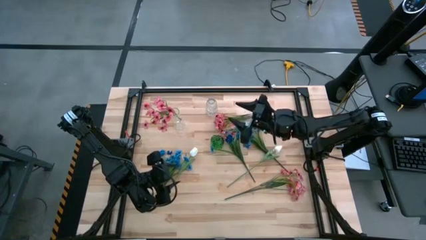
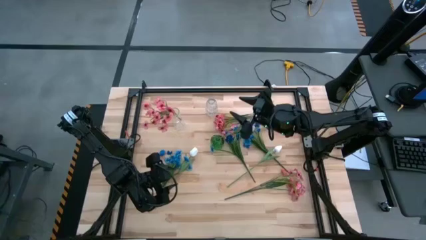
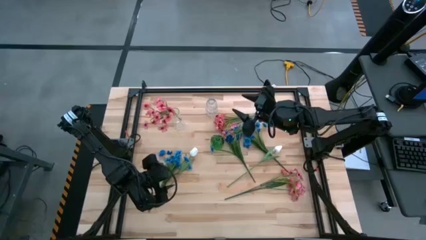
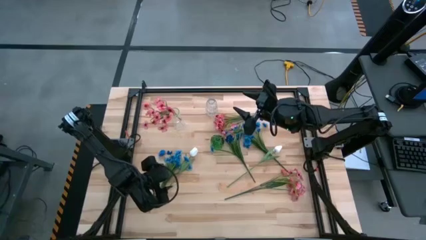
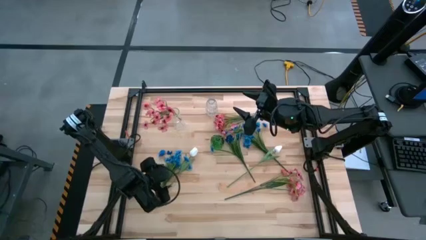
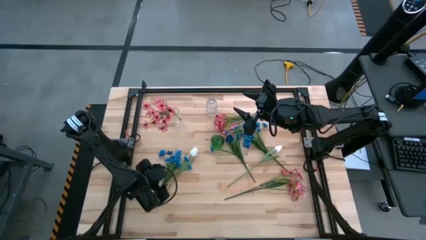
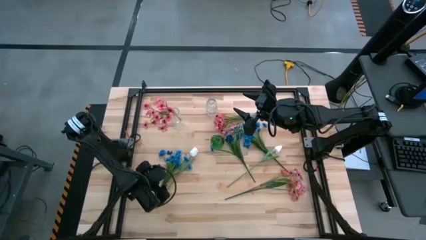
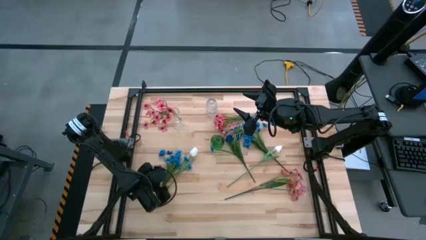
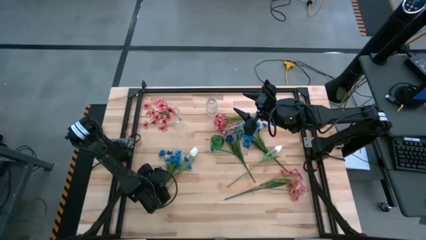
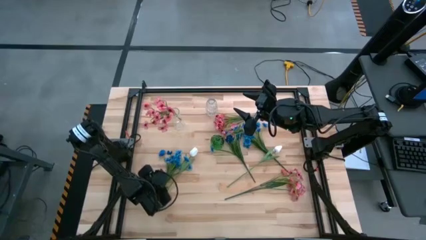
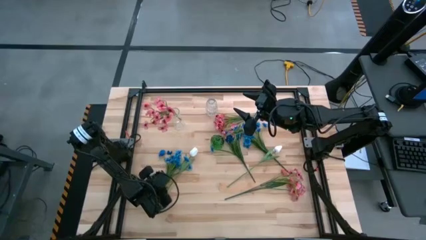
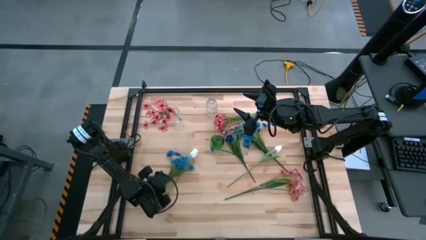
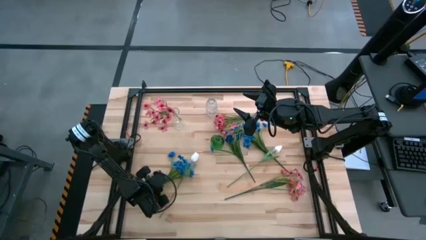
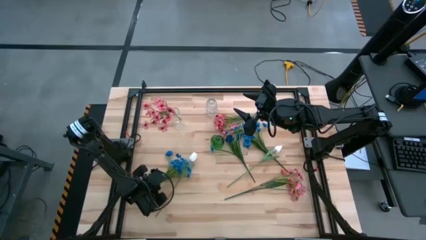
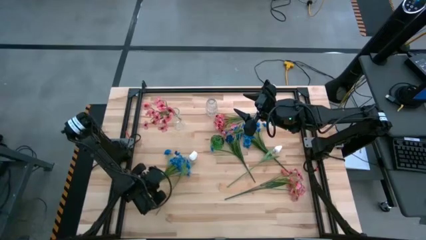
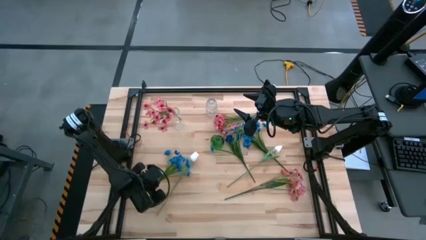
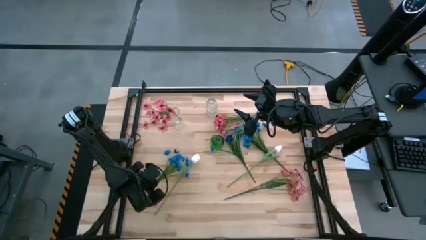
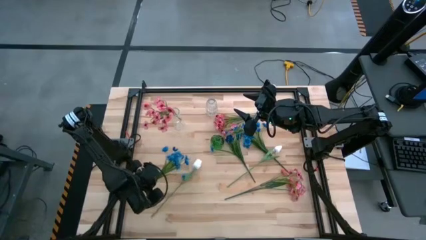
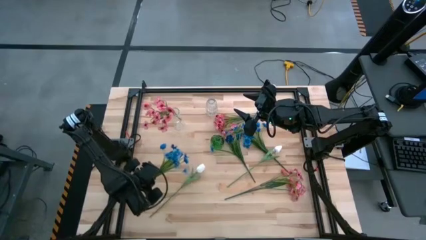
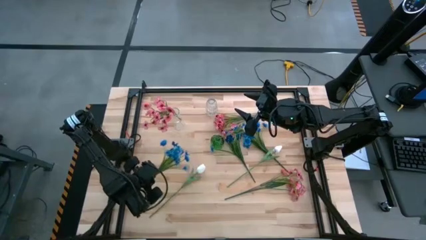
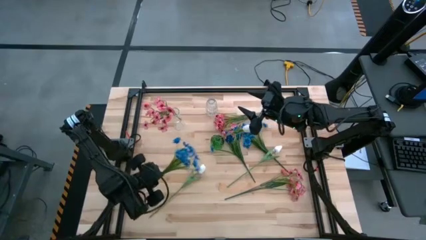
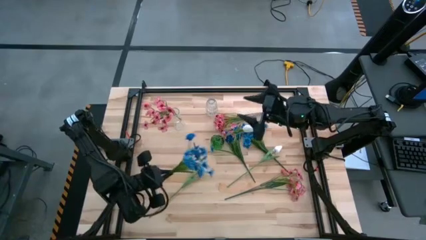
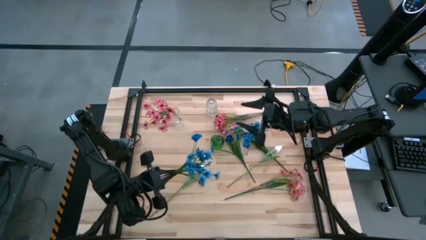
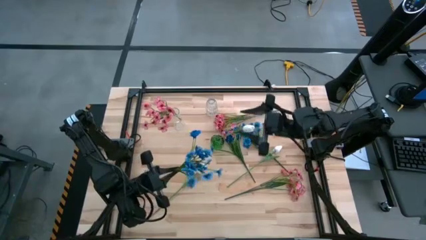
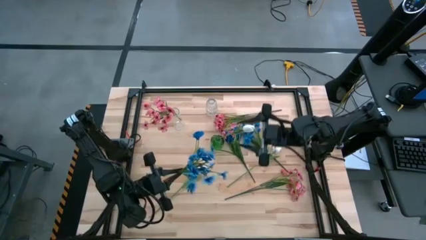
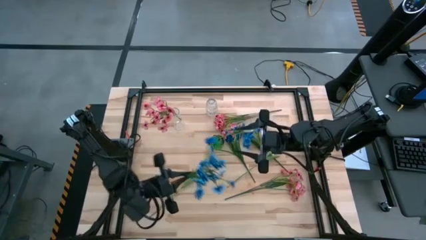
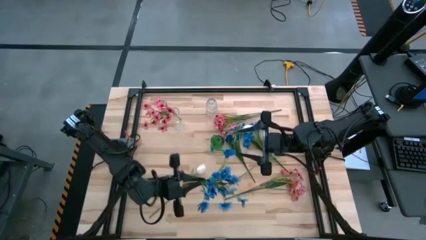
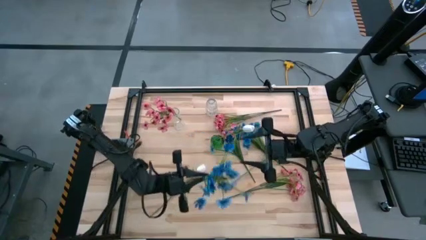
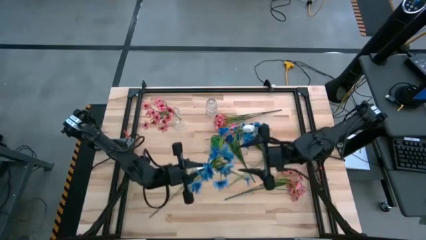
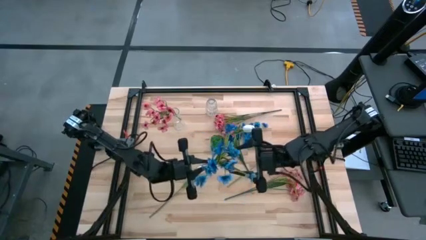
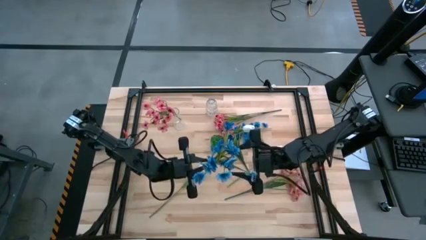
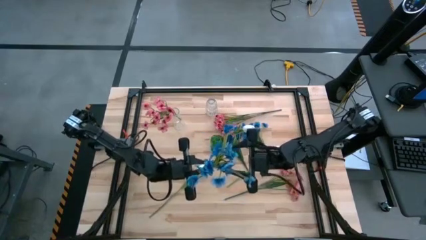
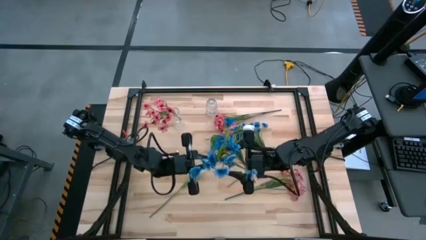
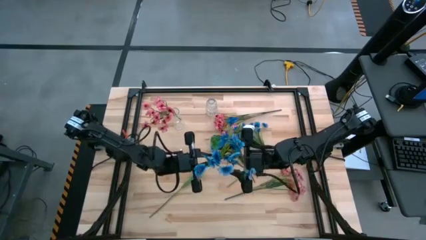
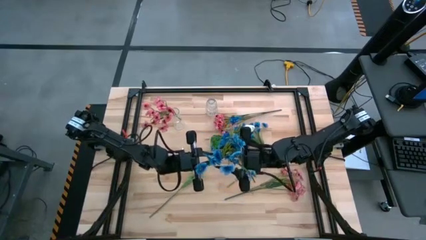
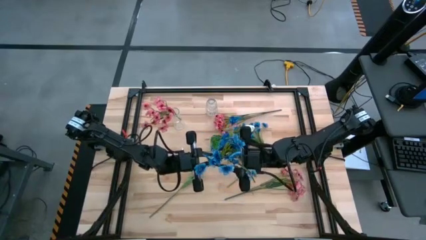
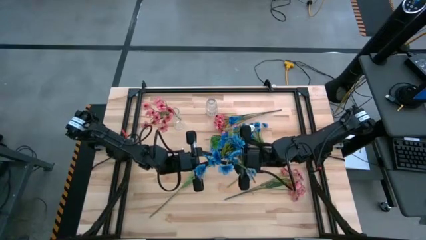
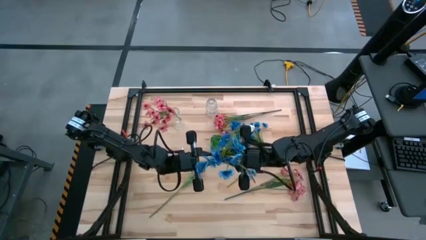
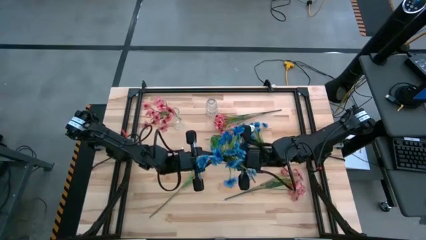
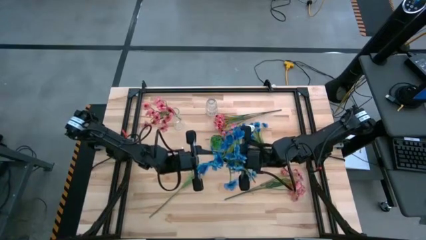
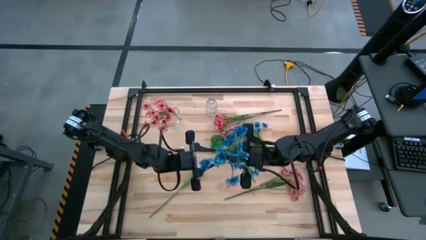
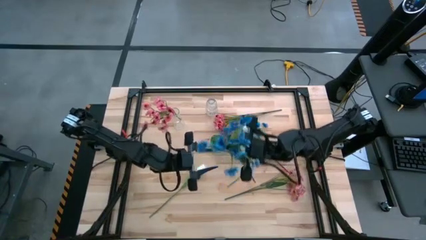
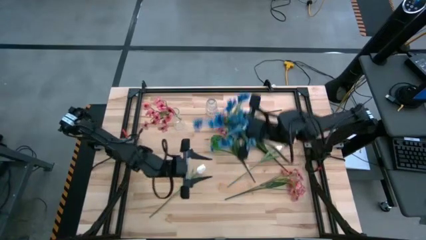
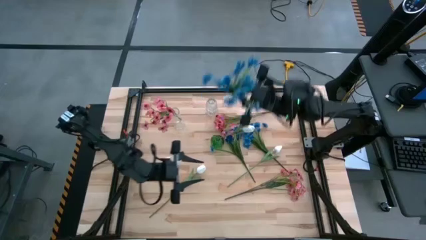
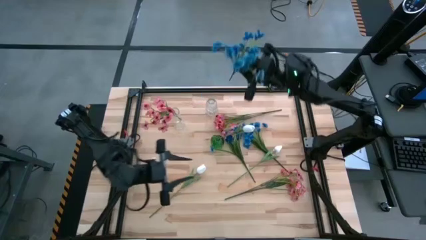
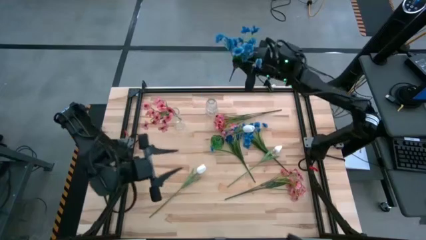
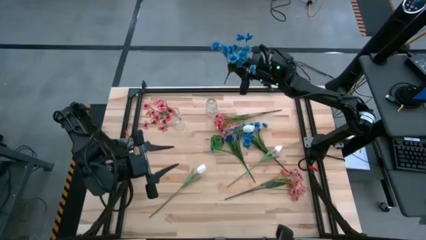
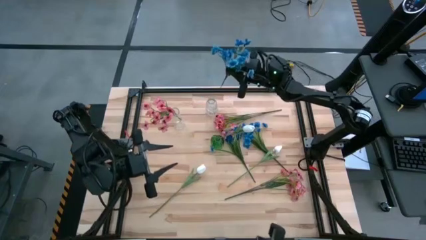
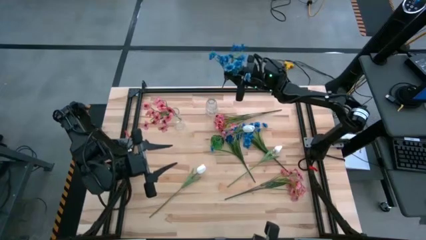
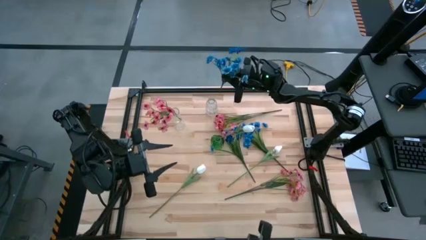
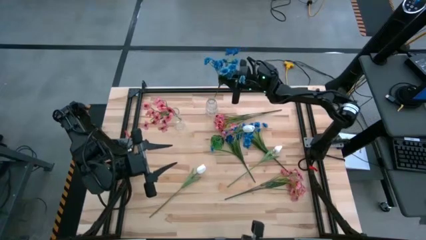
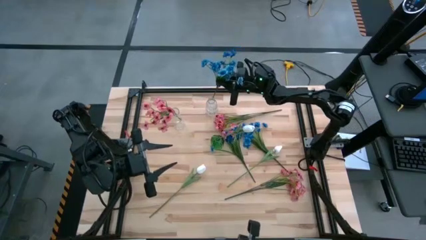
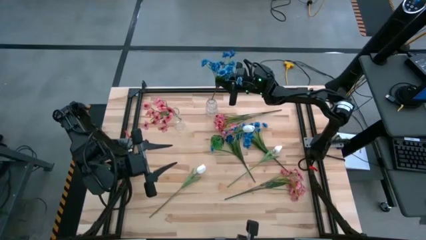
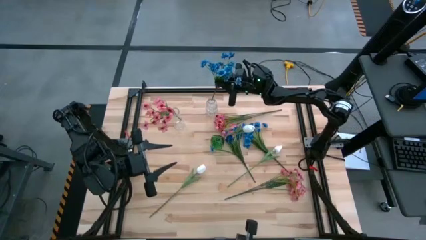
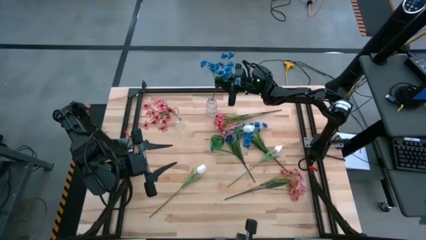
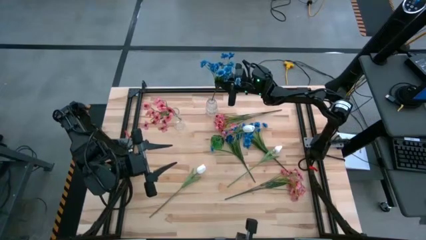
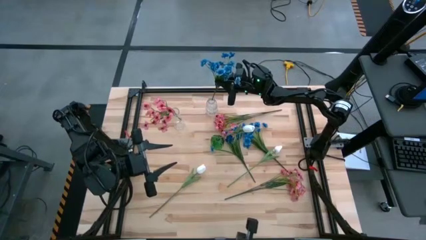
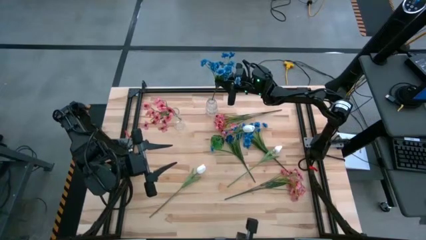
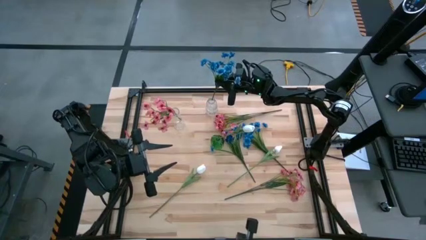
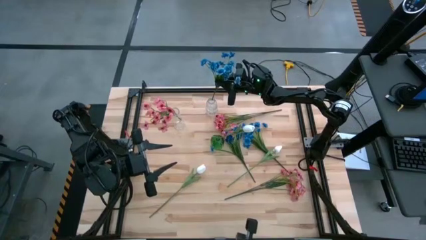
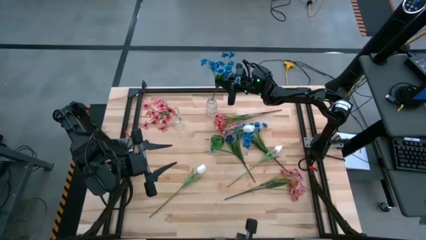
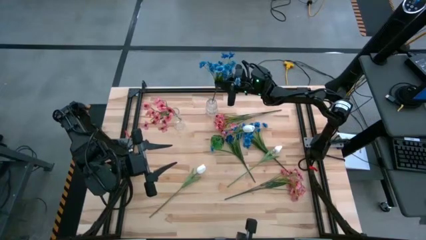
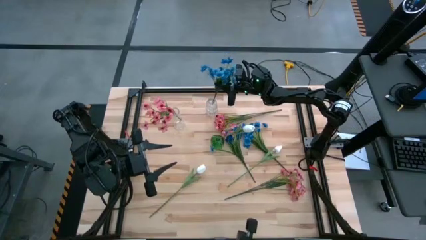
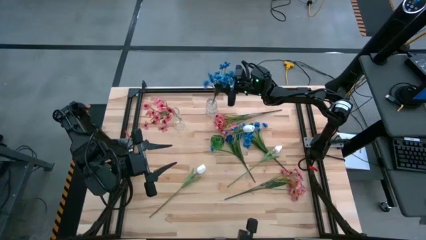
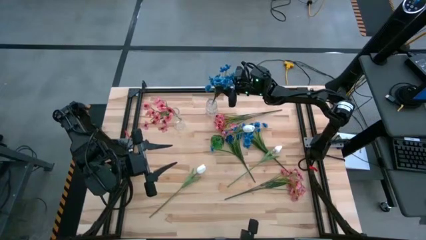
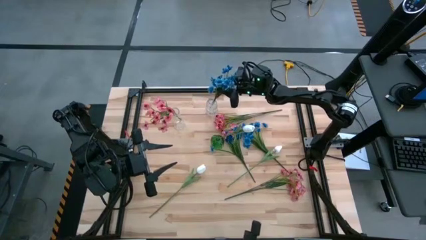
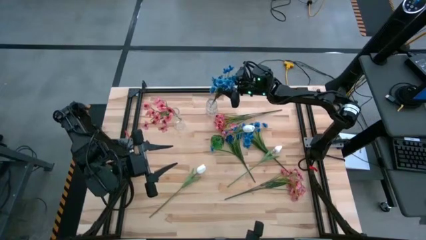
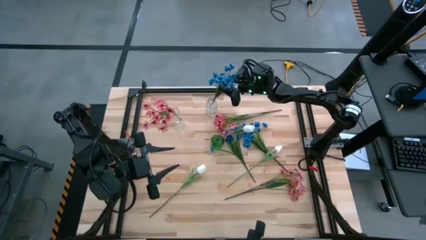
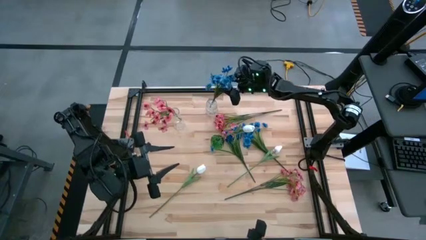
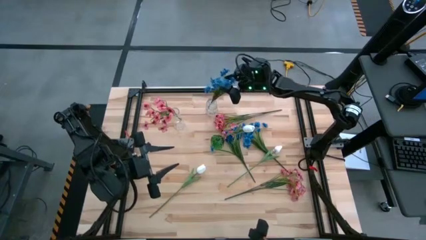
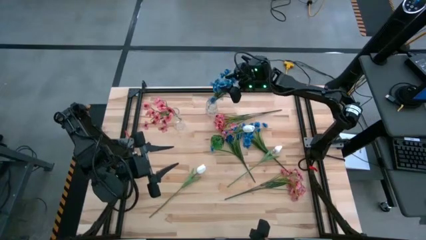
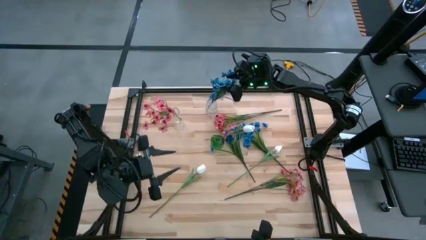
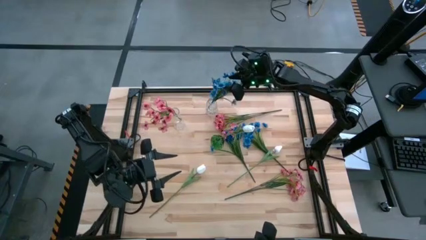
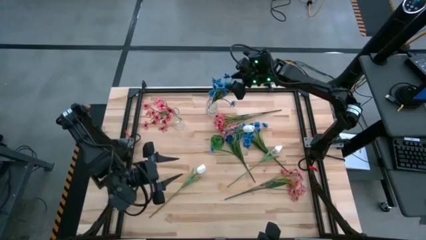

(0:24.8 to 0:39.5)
Task: Sort flowers into vase by color
Put the bottom left blue flowers into the right transparent vase

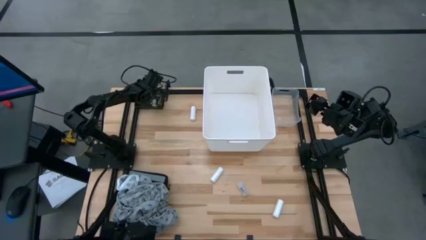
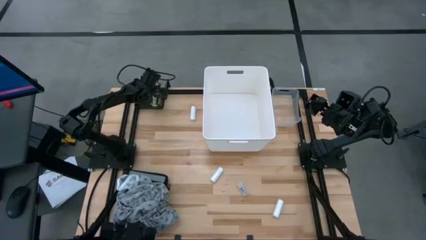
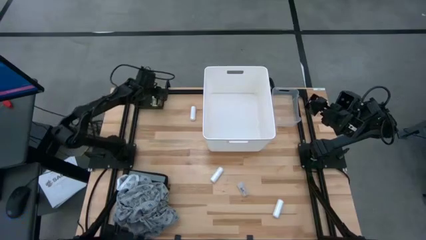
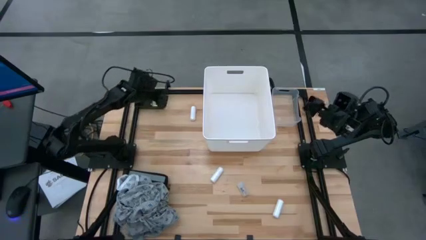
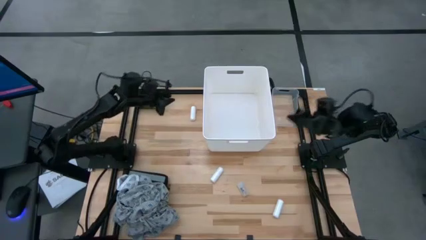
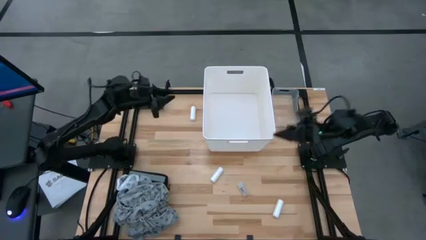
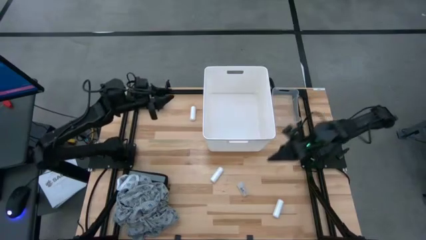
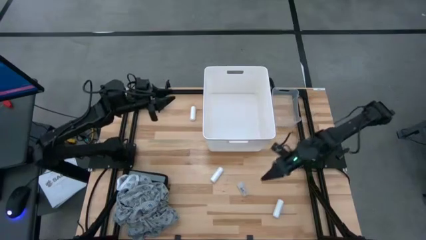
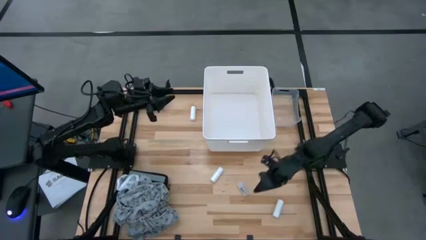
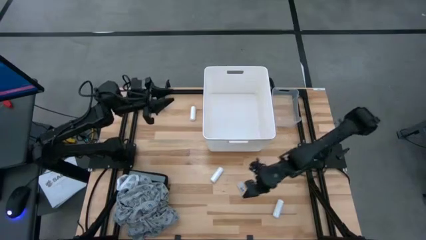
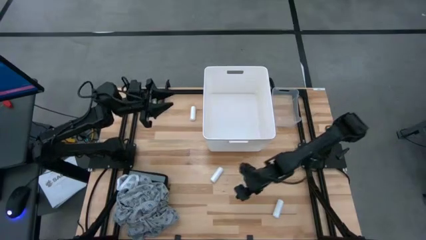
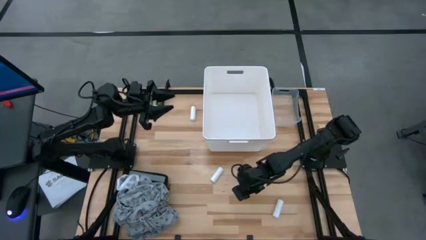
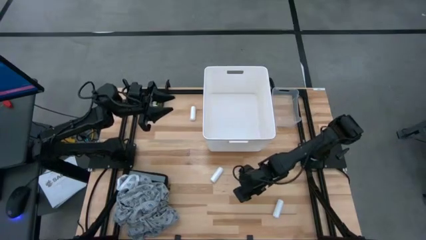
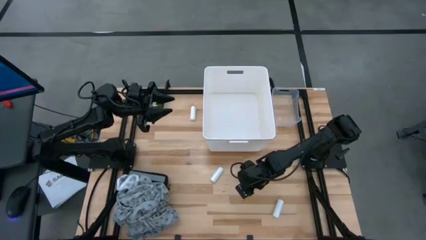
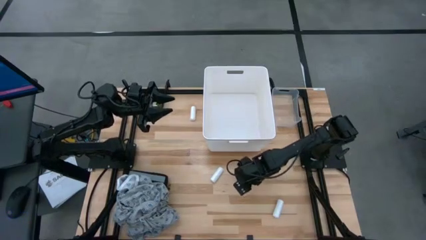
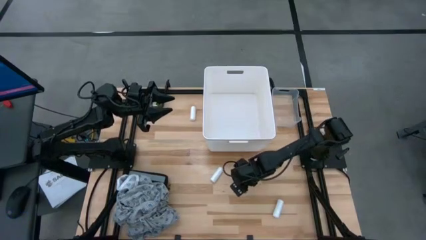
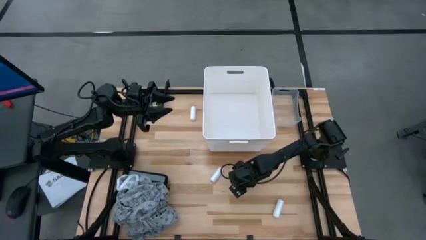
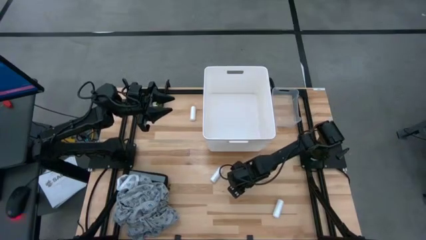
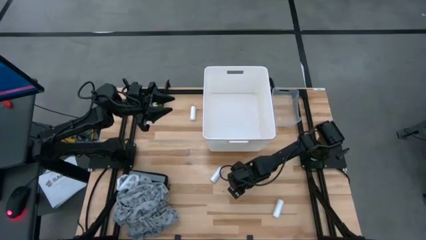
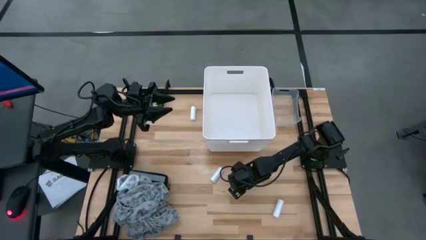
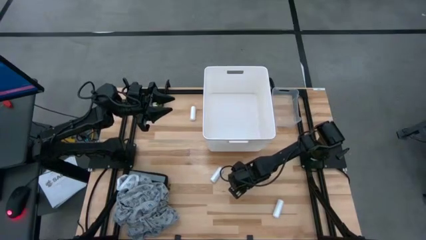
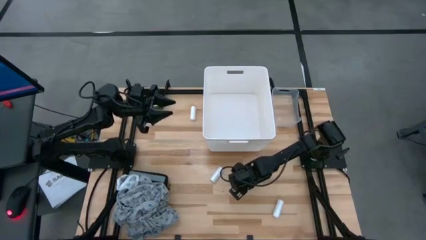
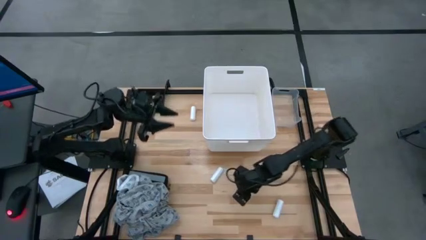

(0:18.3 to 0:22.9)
Task: Pick & place medical supplies in basket/bin
Put the transparent bottle in the black bin
